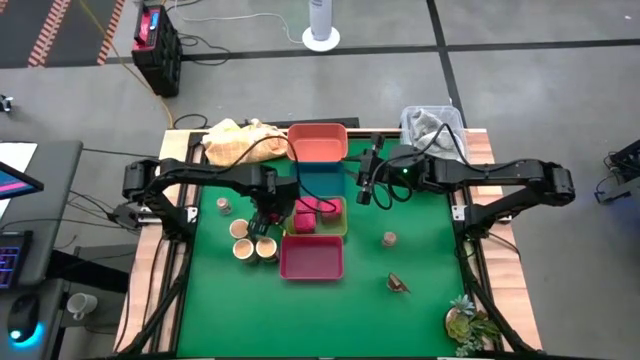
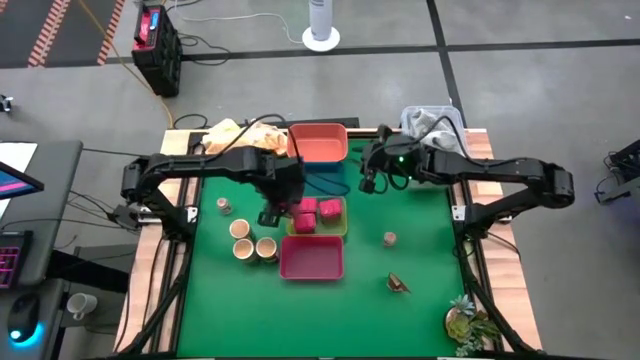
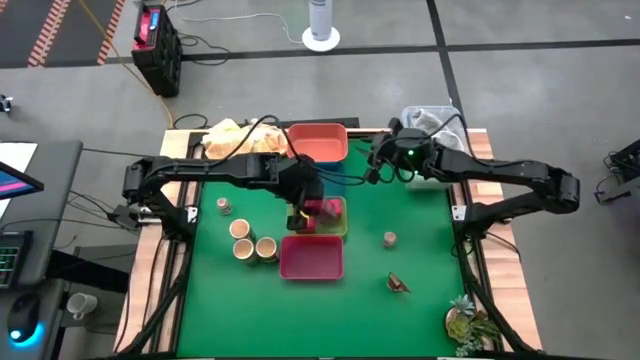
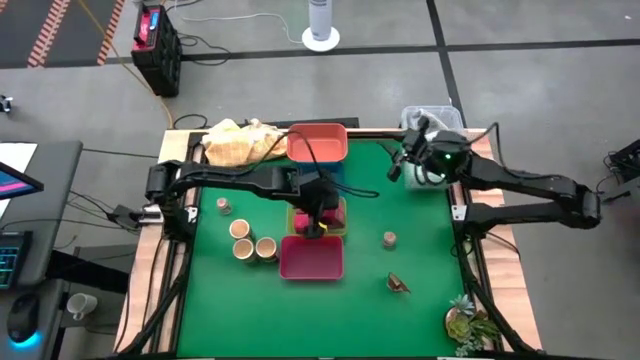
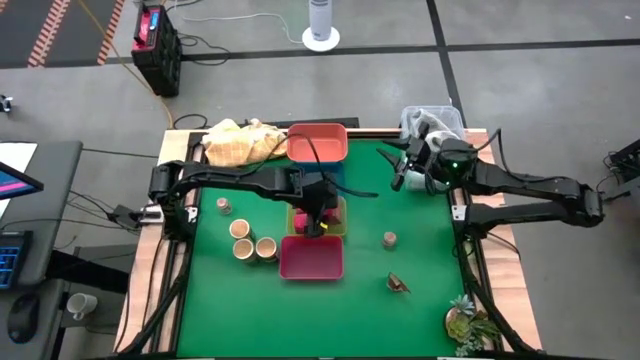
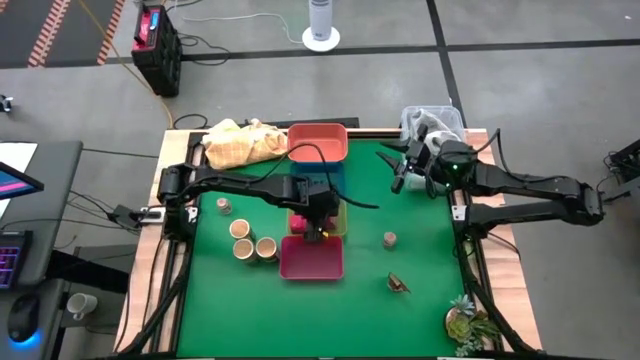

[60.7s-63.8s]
Task: Sort spices by type
Put the red seasoning bottle into the green bin

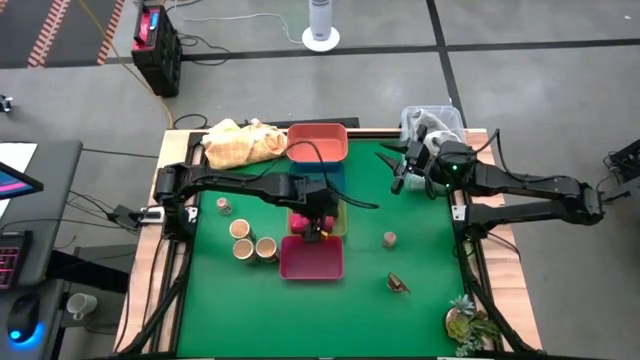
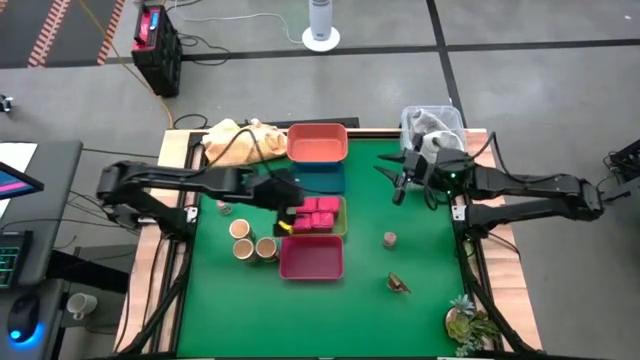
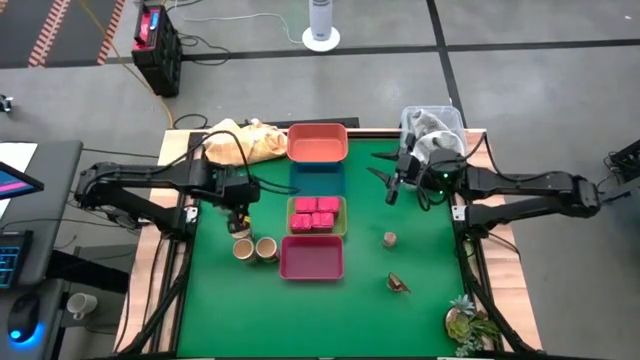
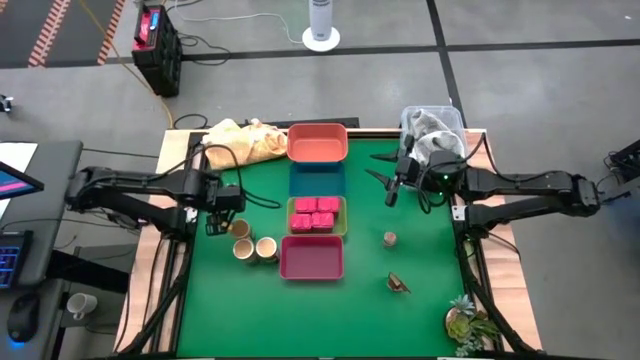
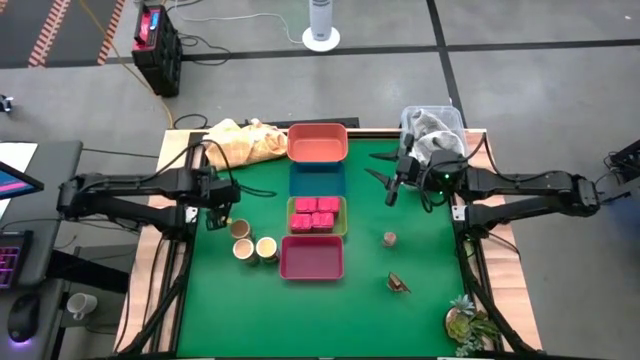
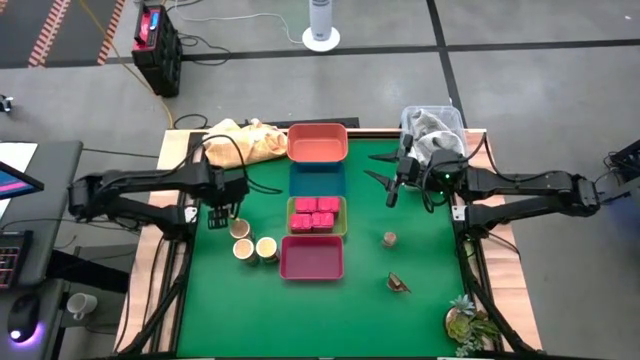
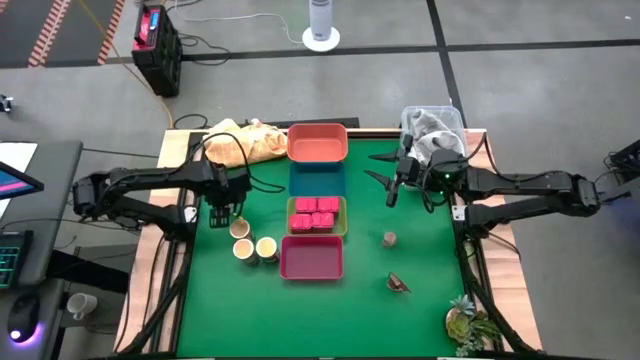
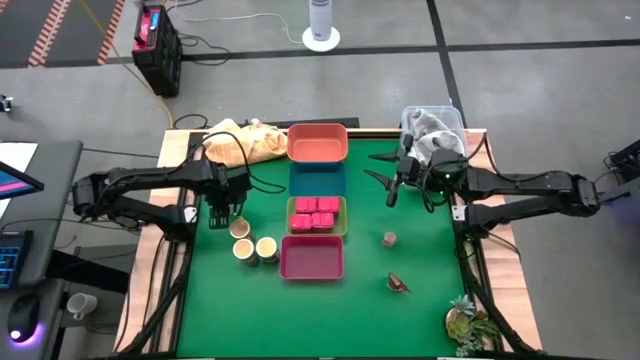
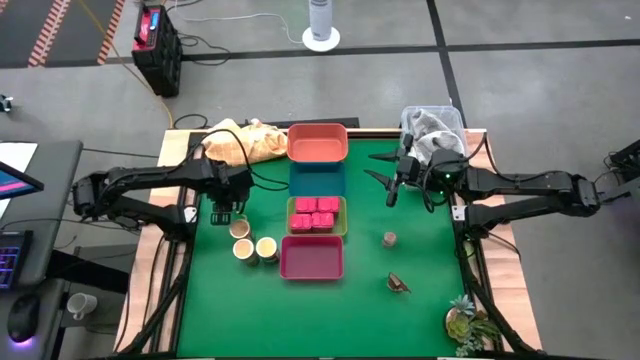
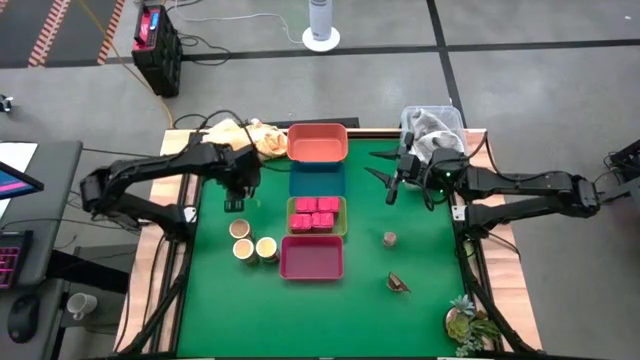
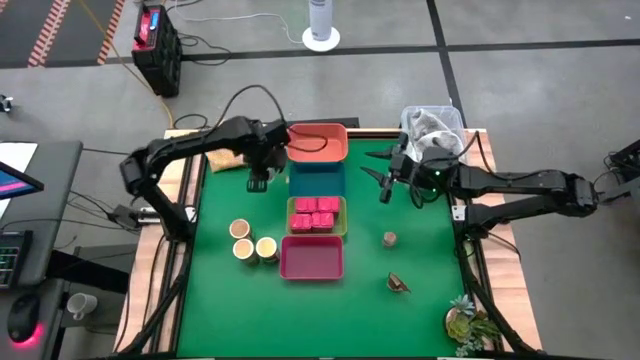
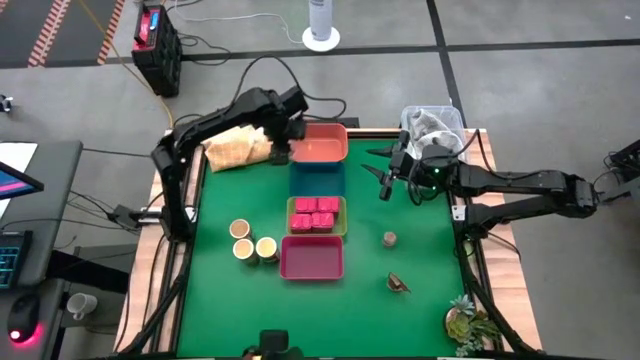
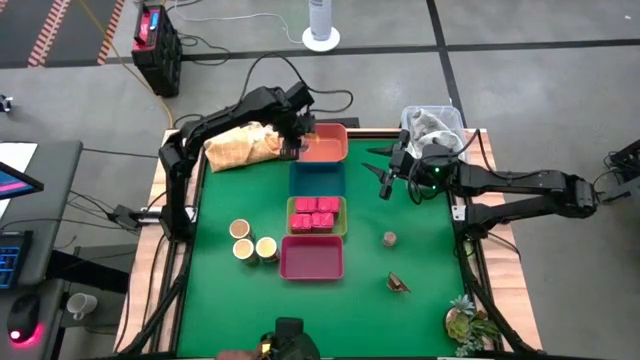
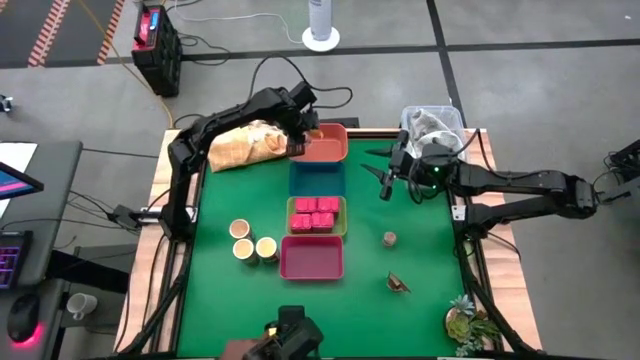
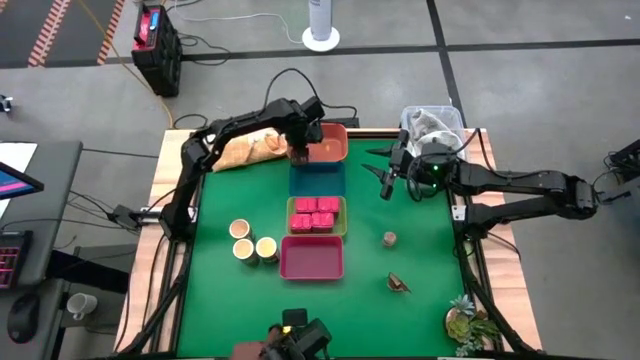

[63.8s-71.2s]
Put the left transparent seasoning bottle into the orange bin

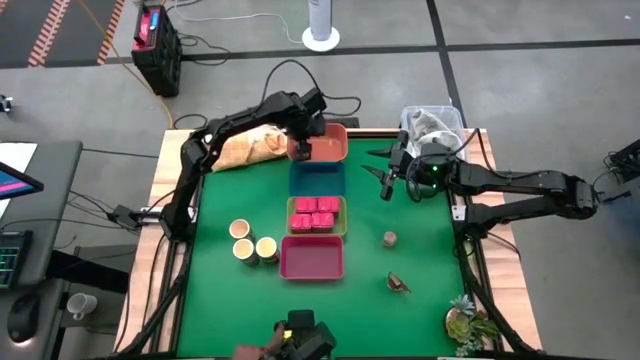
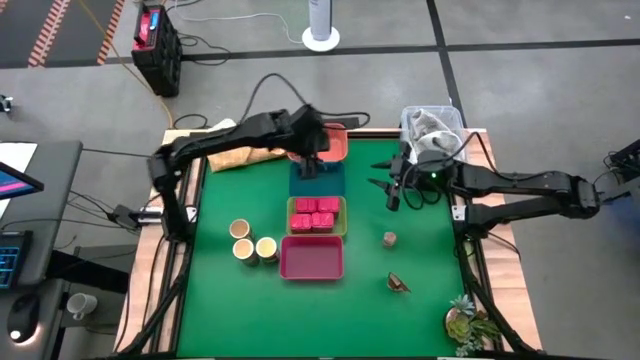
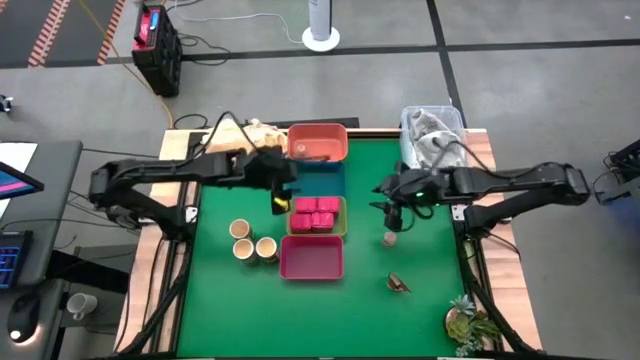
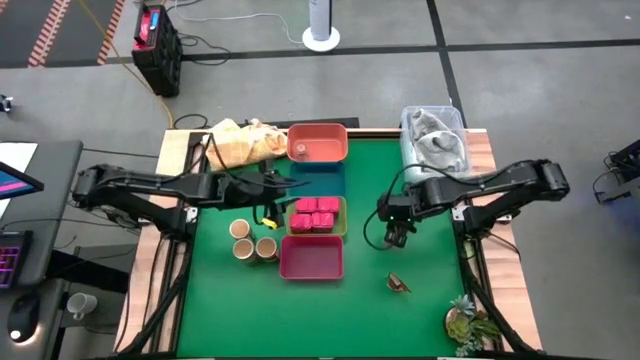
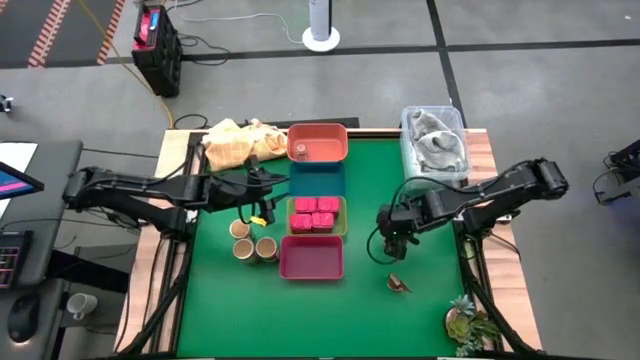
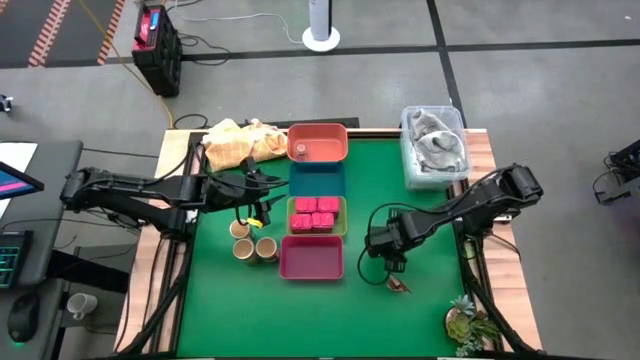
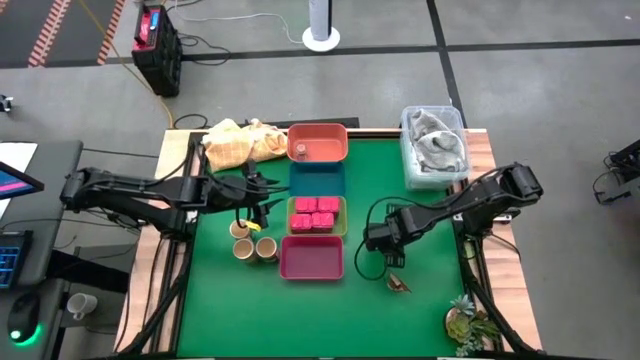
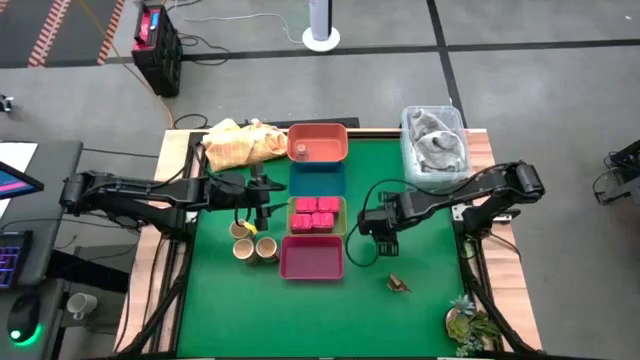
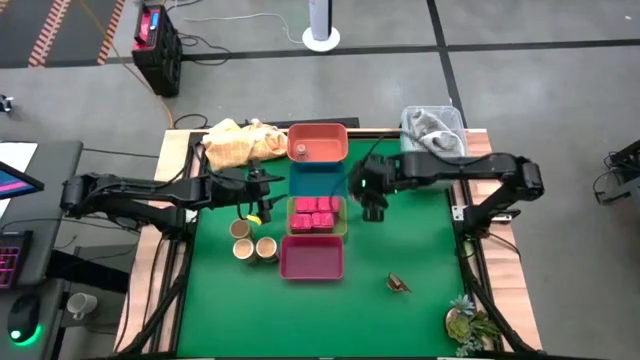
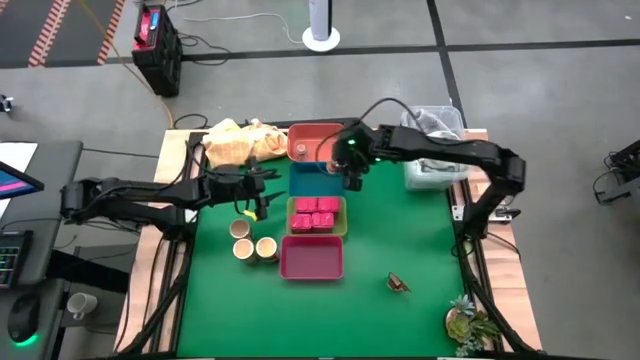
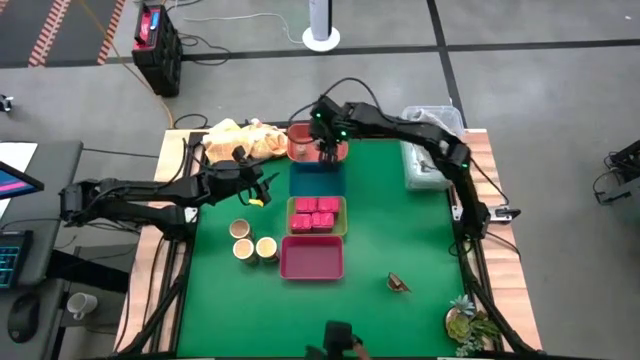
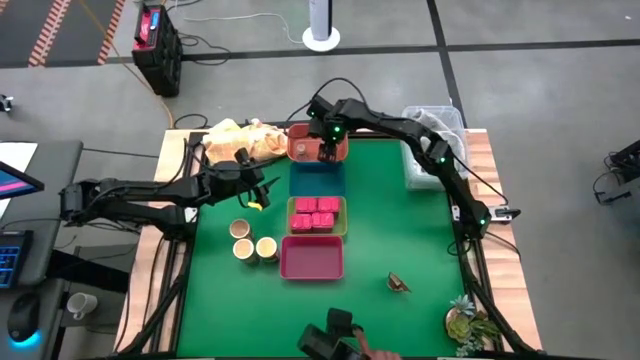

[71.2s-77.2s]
Put the transparent seasoning bottle into the orange bin

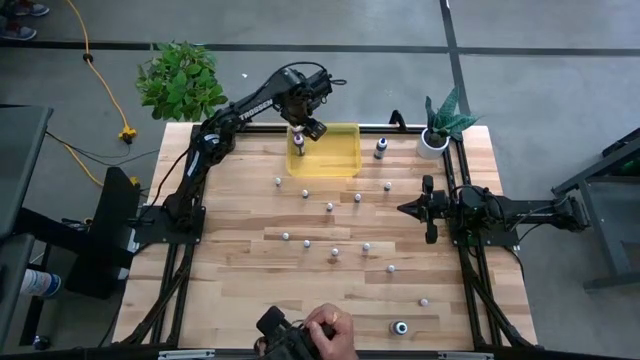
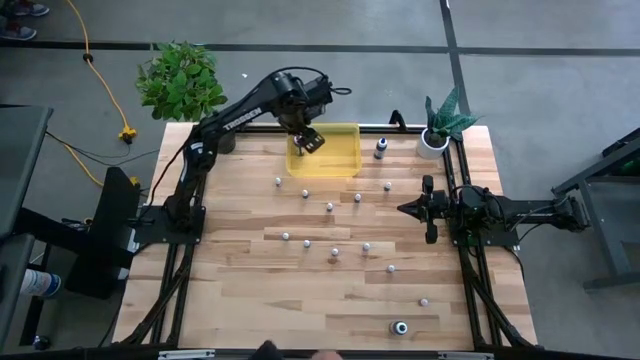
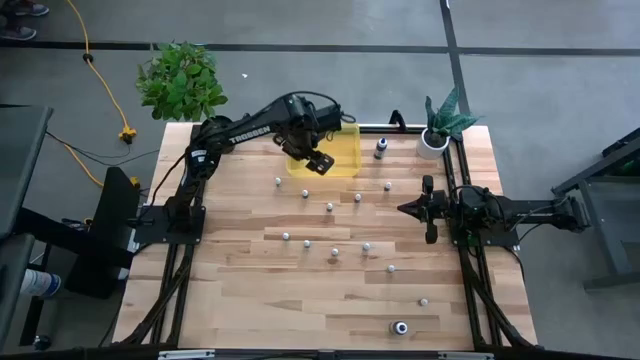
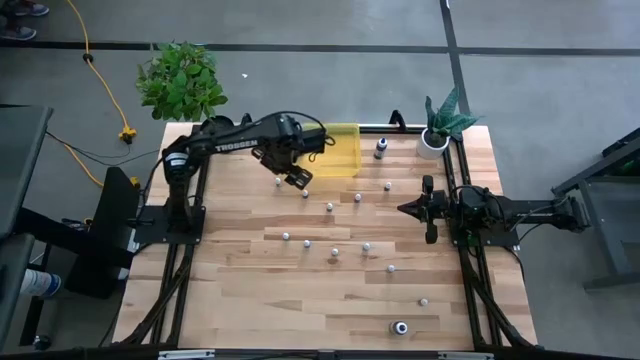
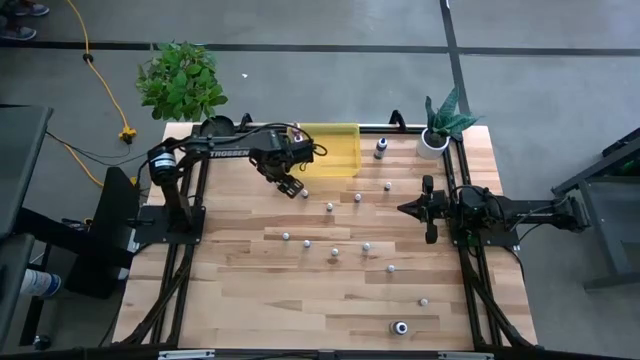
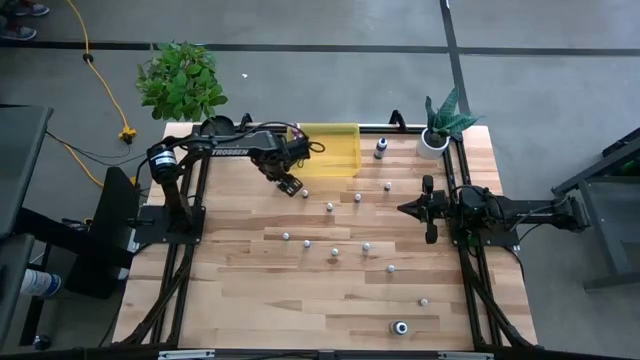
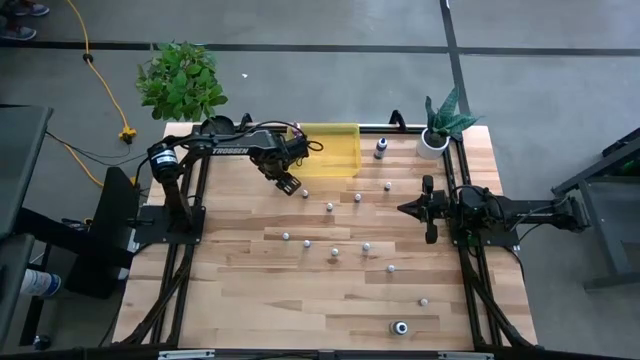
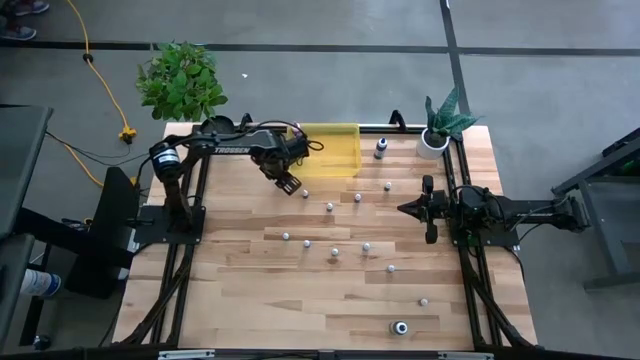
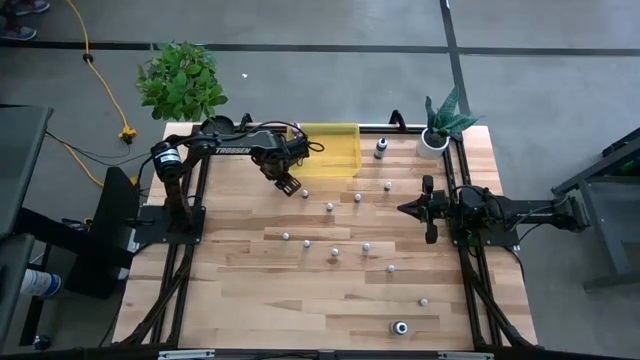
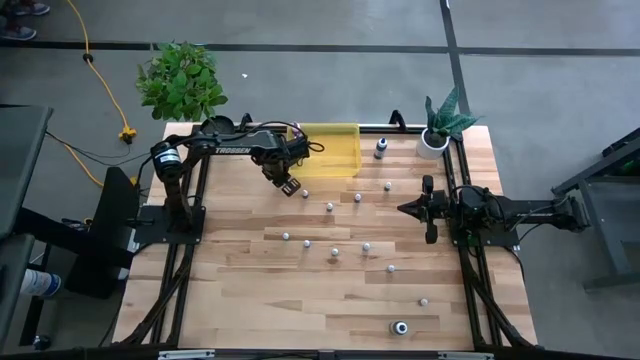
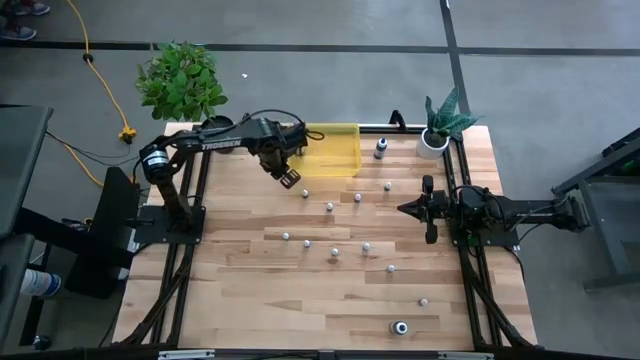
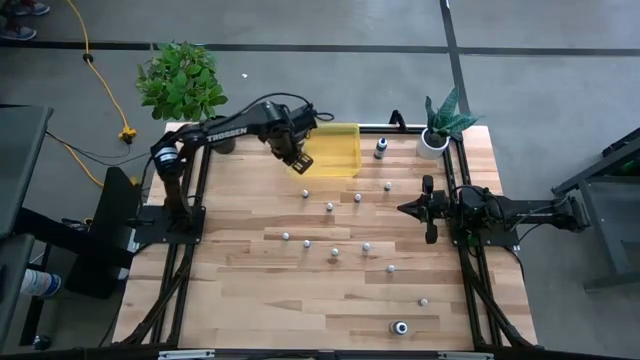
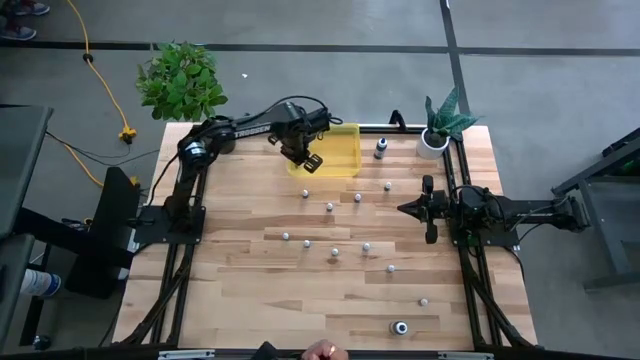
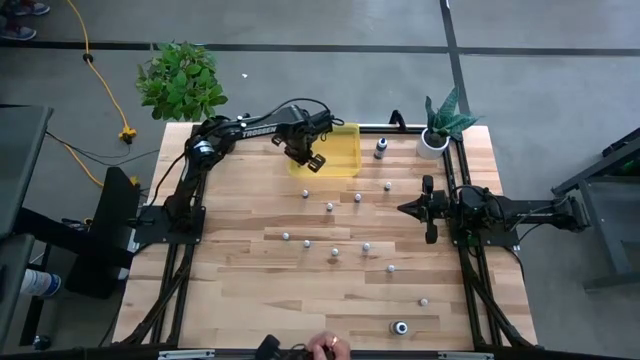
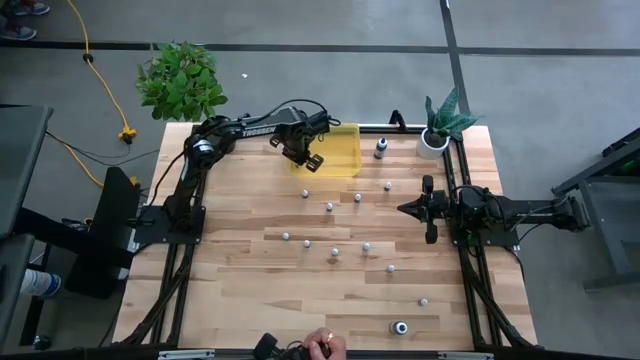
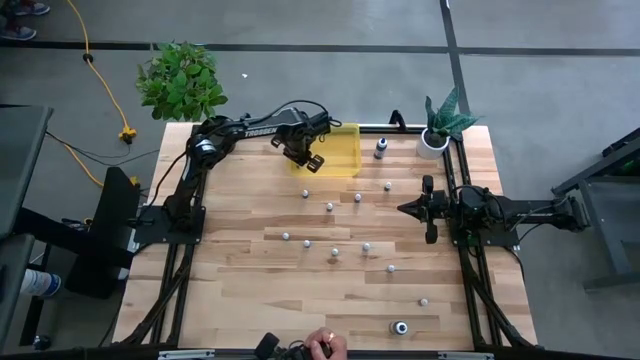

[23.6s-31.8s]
Task: Pick & Place food coloring
Put the right small black food coloring bottle into the yellow container
